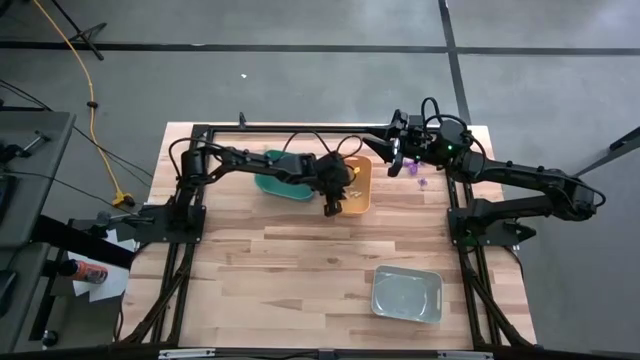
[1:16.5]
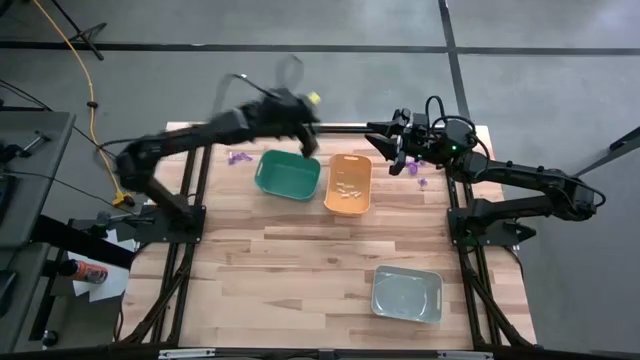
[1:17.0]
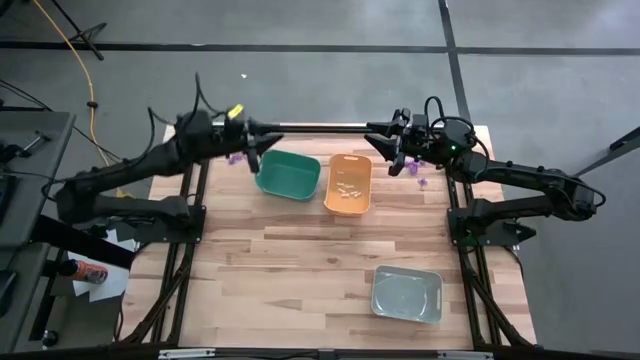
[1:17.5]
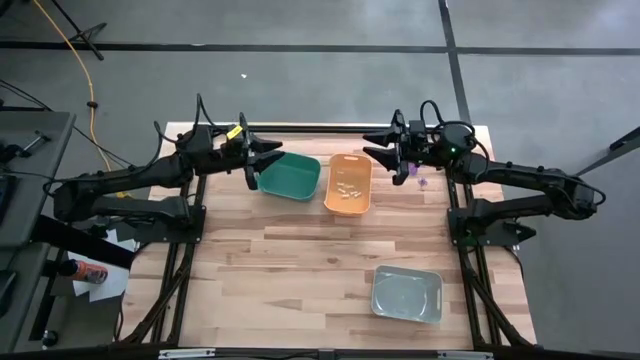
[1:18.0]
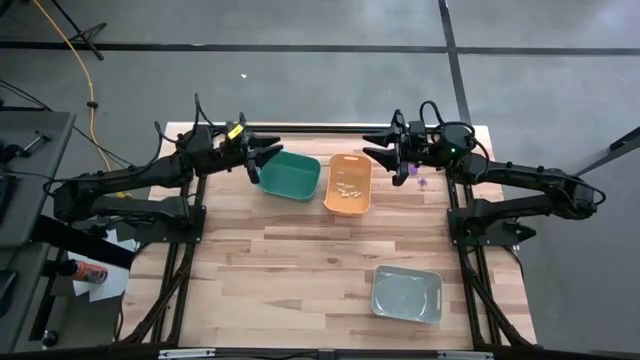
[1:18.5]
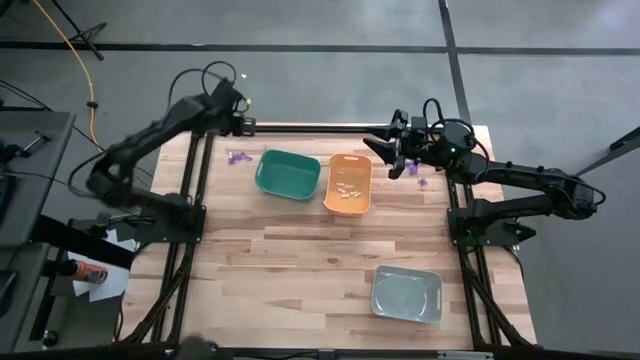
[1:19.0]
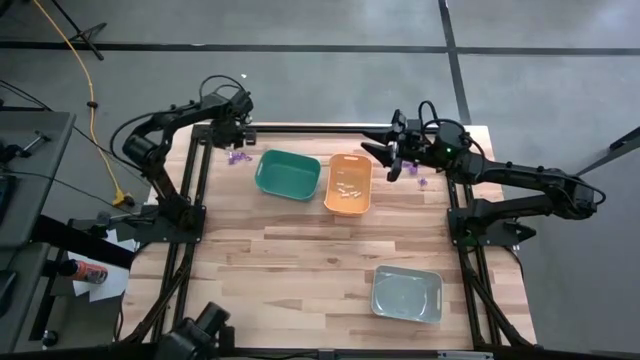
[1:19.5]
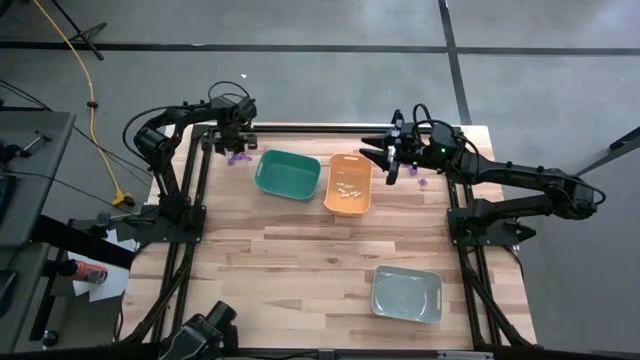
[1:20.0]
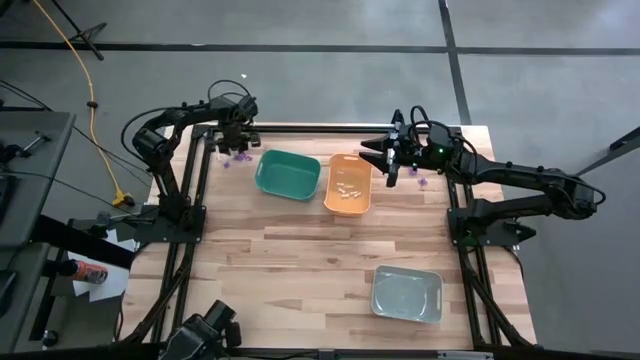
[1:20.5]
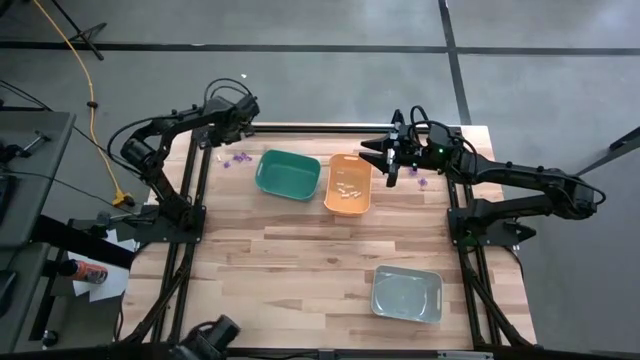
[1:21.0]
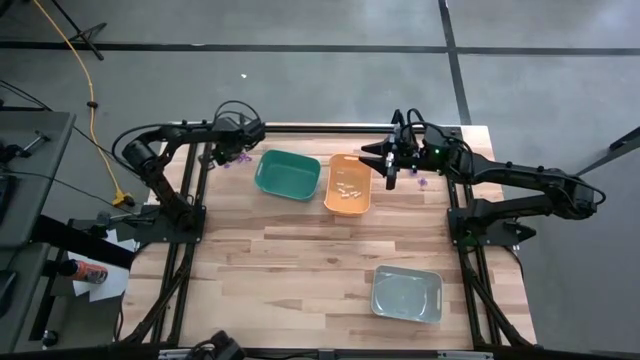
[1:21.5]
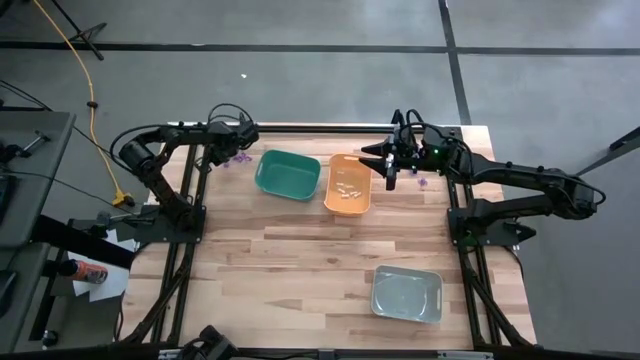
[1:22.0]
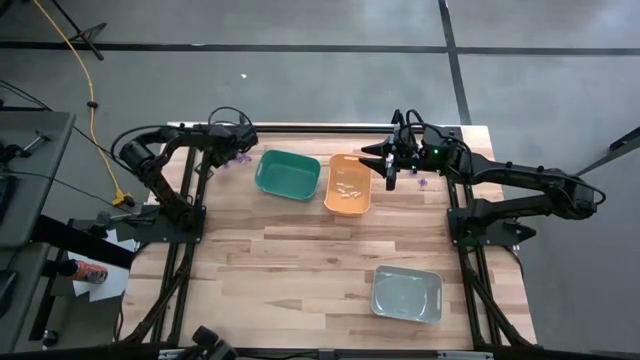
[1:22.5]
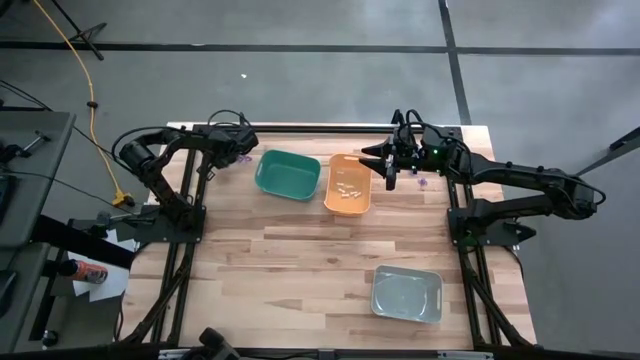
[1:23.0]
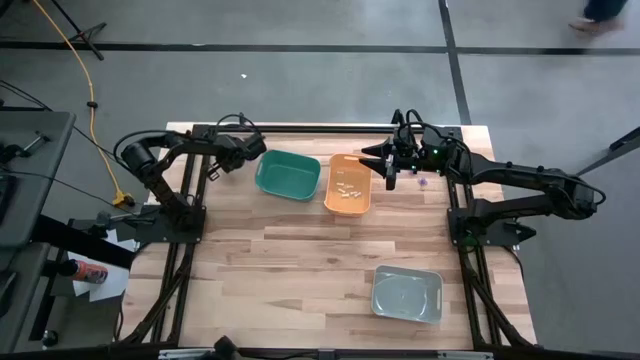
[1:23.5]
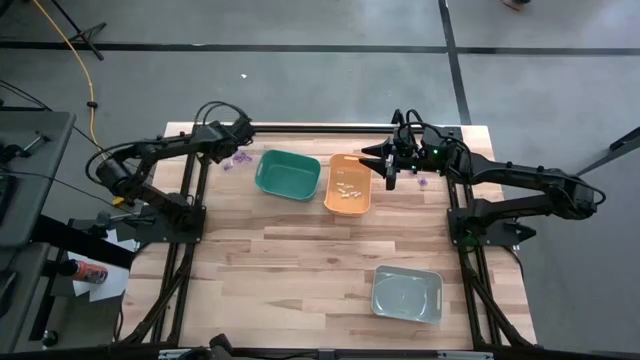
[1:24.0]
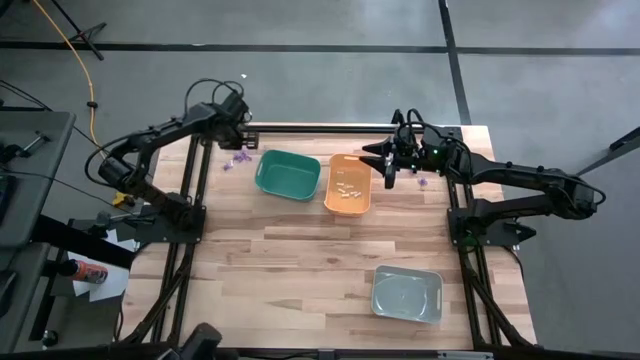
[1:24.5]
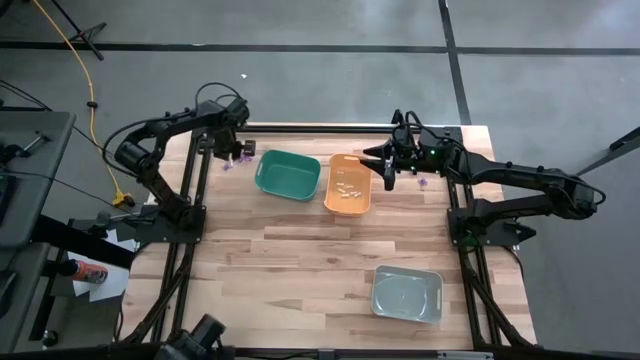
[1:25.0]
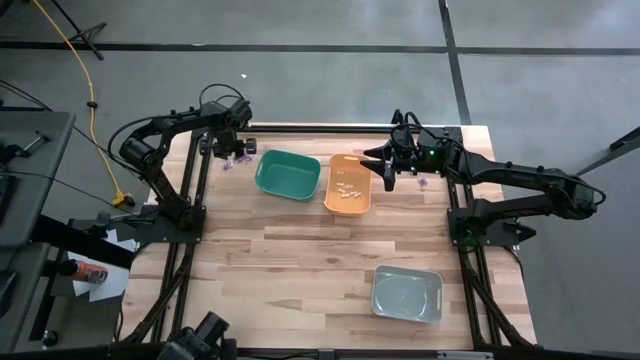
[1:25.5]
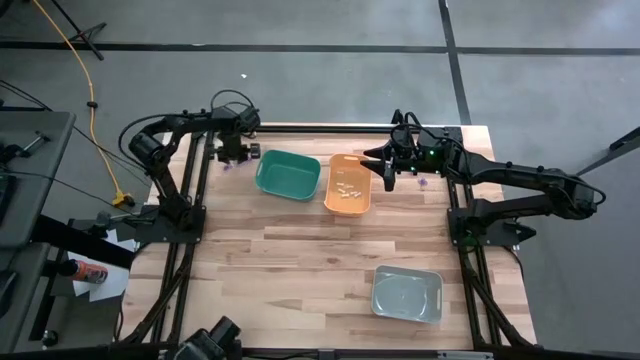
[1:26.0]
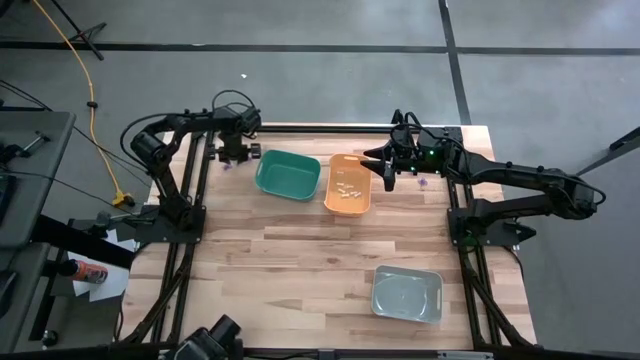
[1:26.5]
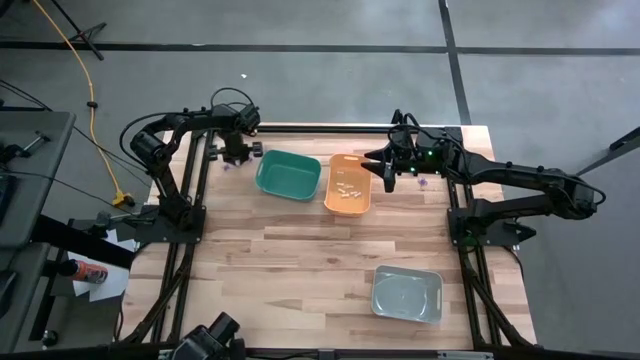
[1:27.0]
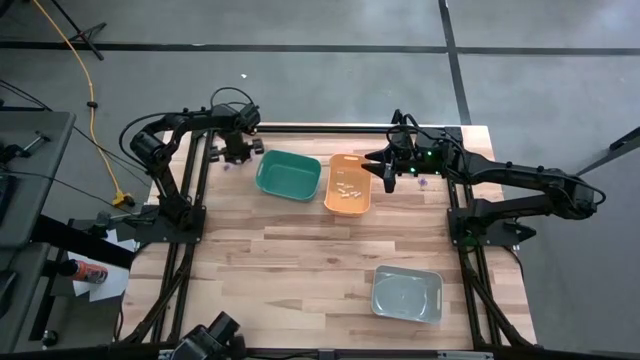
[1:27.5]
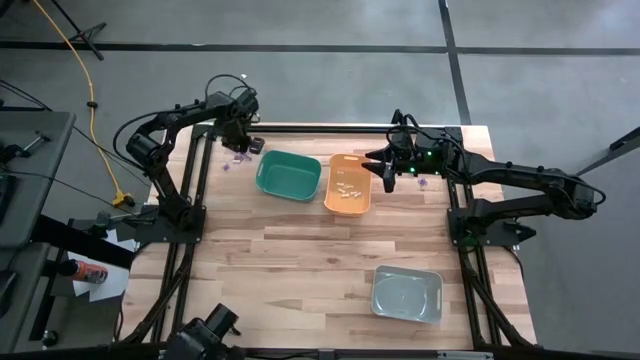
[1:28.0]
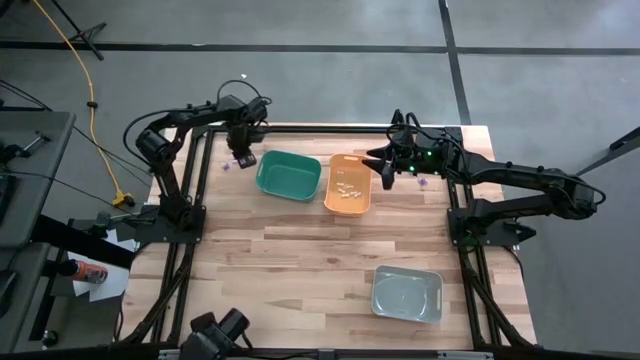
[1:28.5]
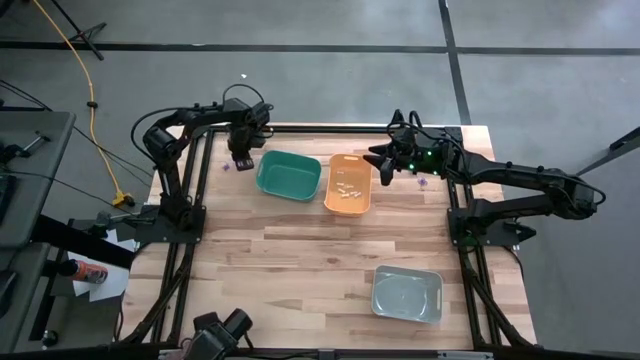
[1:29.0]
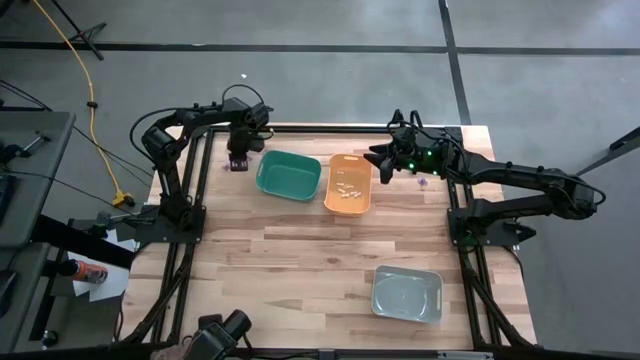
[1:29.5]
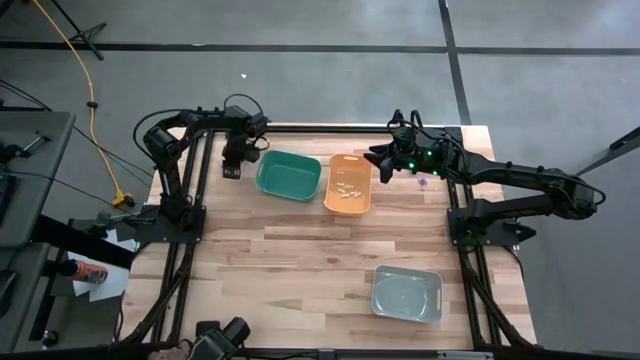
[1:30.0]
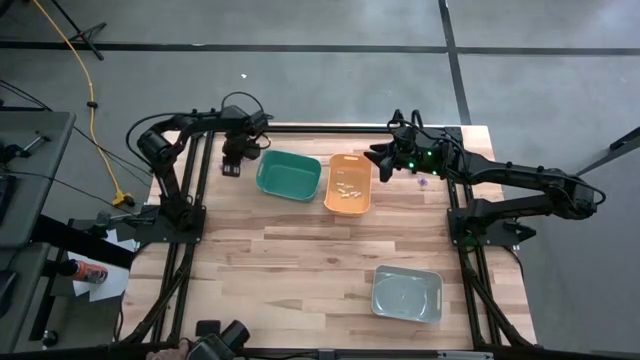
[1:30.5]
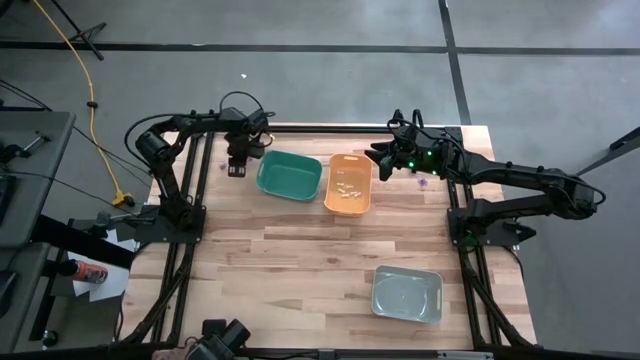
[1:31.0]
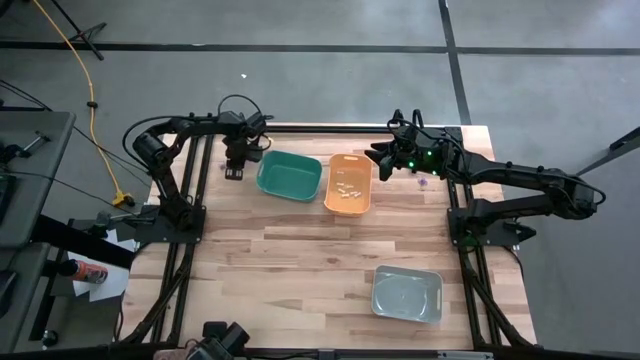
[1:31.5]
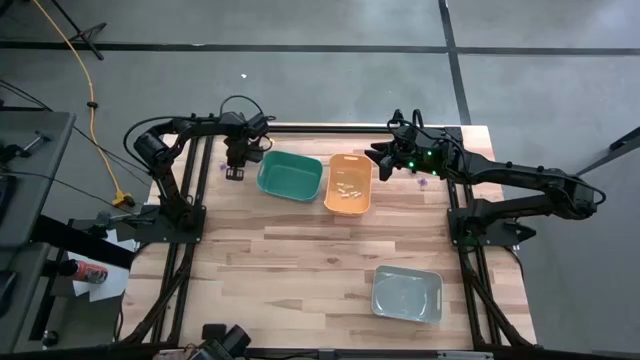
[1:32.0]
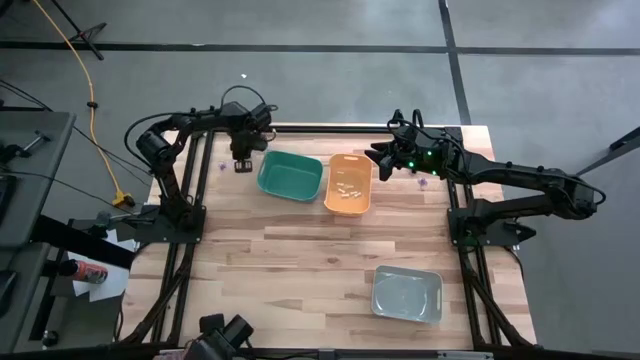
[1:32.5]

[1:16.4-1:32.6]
Task: Sort Halloween decoration
Put the white bone toy into the yellow bin

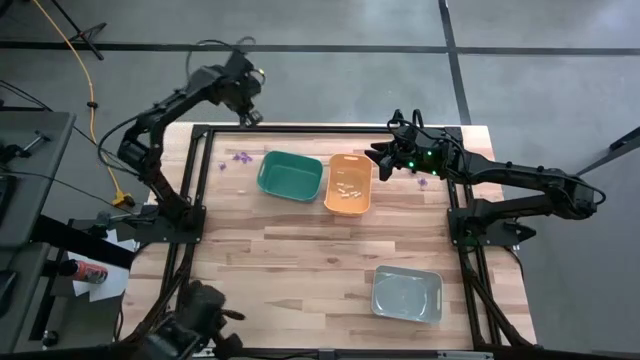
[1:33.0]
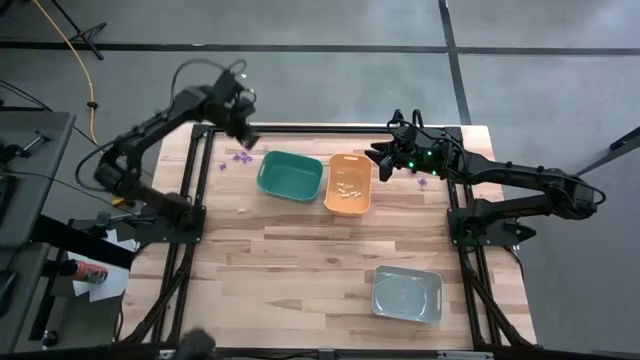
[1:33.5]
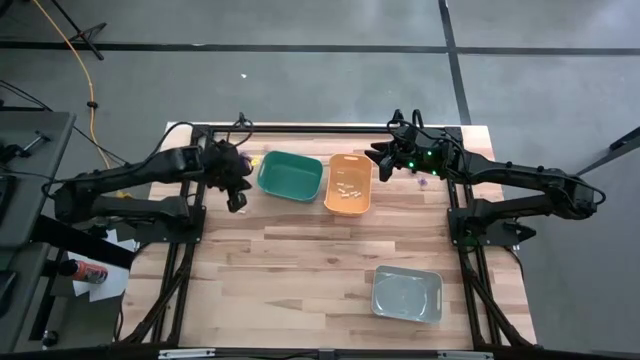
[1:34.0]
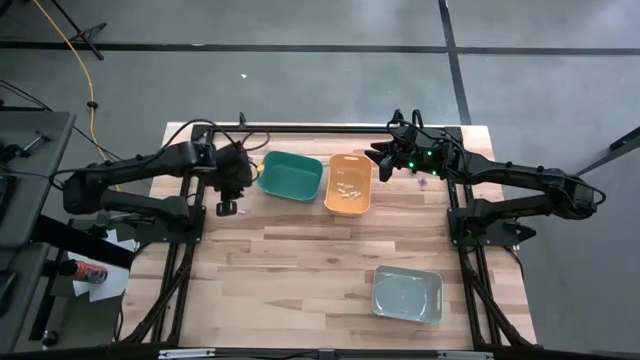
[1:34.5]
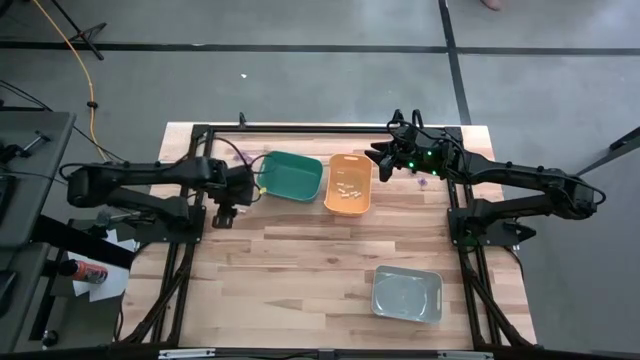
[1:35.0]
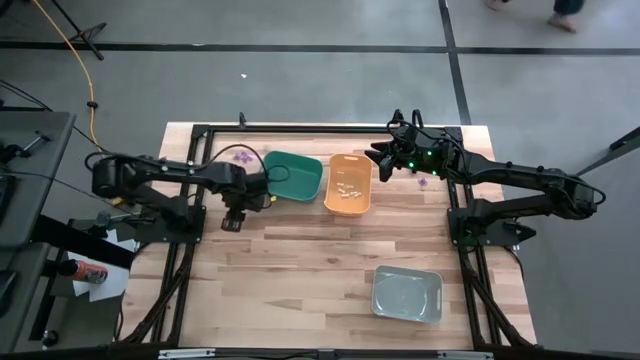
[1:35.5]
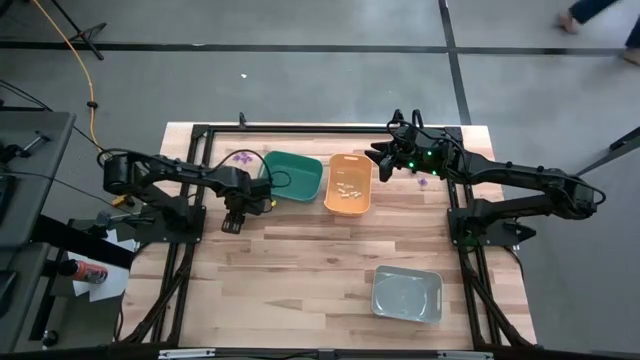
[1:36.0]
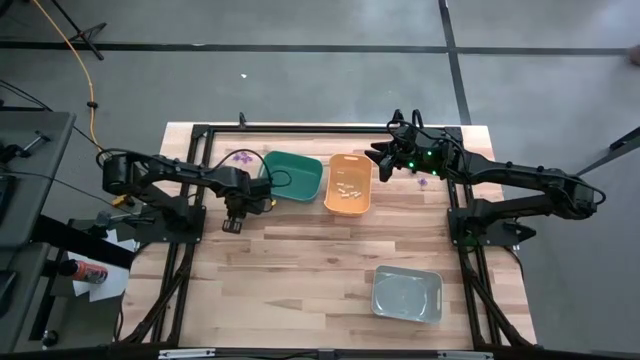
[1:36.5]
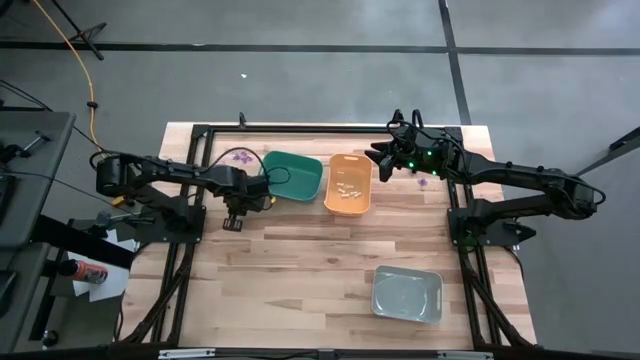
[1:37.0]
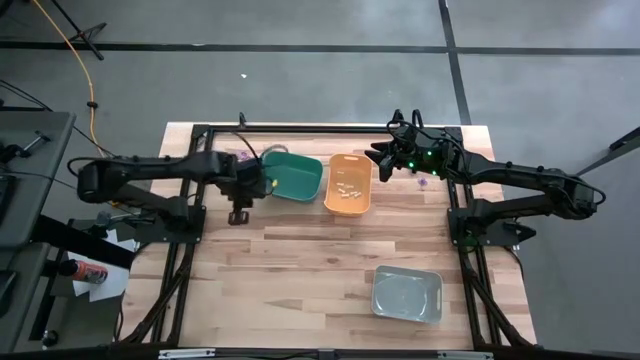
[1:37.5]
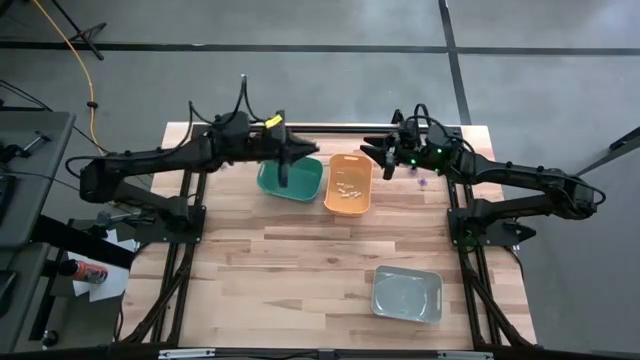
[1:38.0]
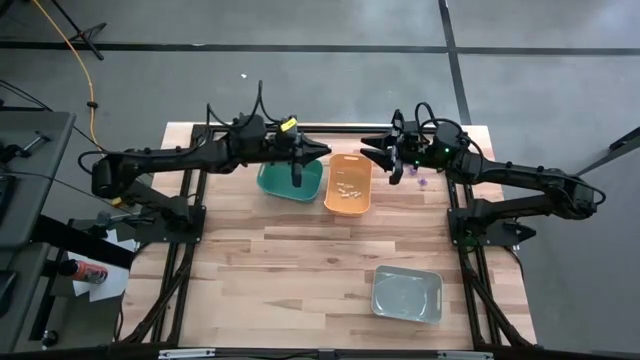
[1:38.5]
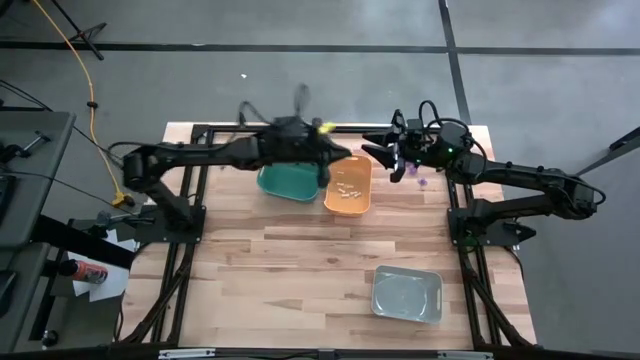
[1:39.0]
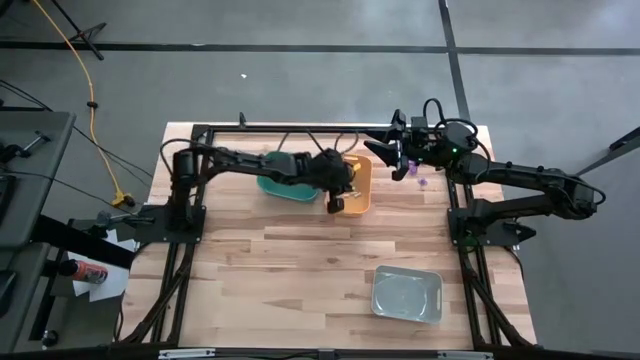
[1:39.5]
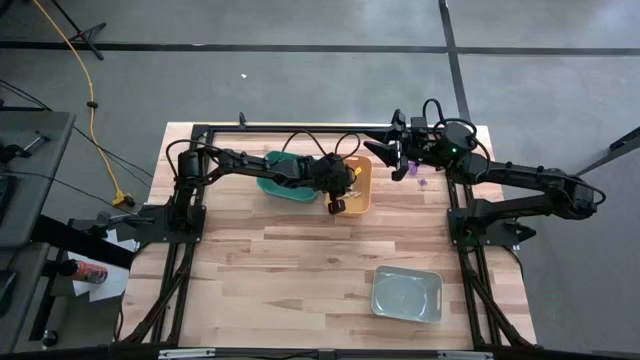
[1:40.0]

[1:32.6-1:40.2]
Put the white bone toy into the yellow bin
